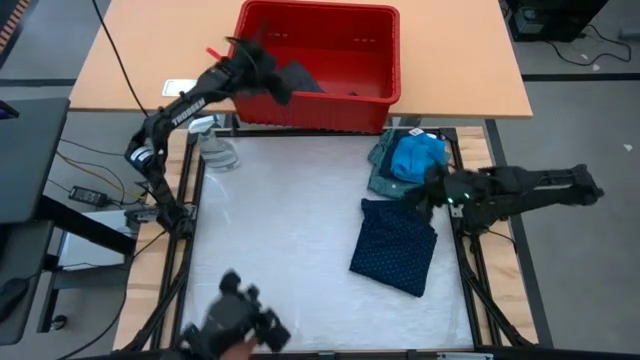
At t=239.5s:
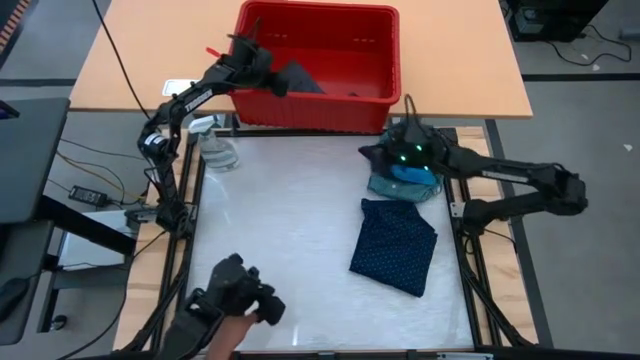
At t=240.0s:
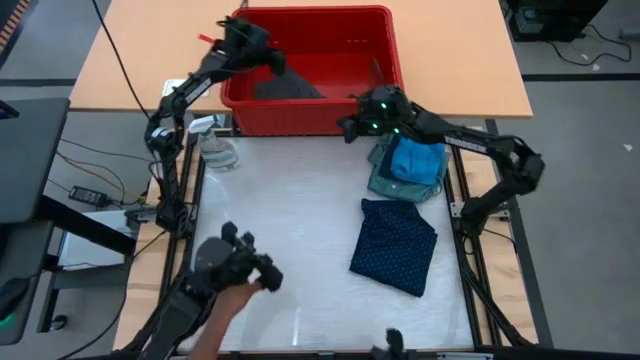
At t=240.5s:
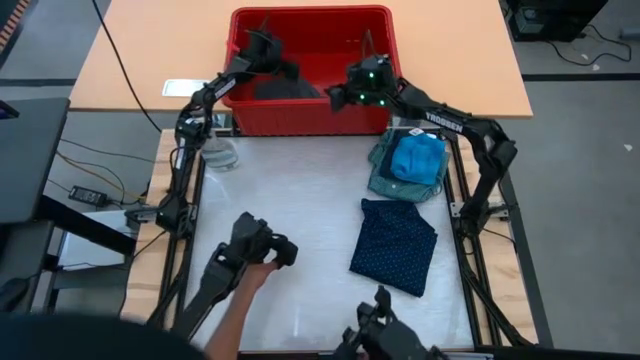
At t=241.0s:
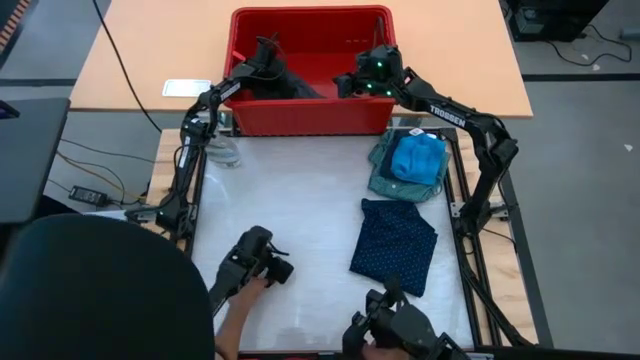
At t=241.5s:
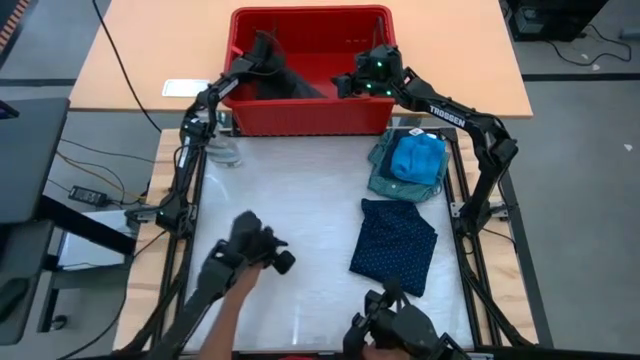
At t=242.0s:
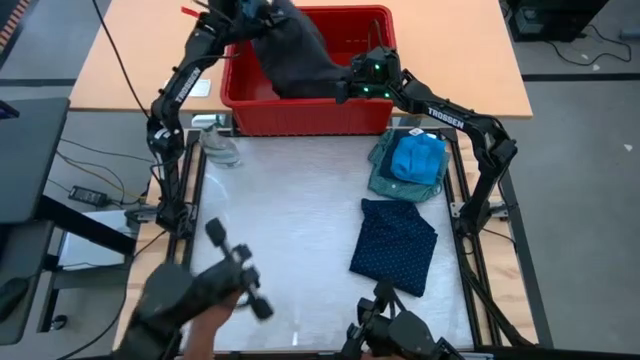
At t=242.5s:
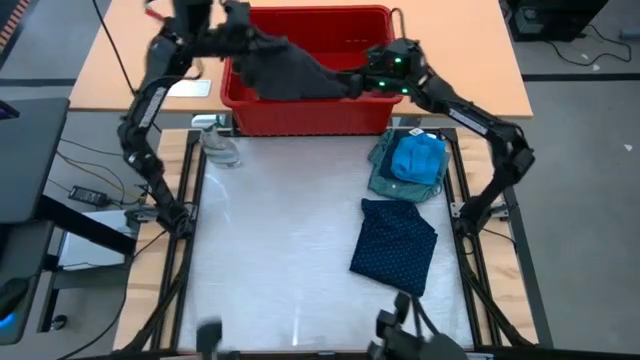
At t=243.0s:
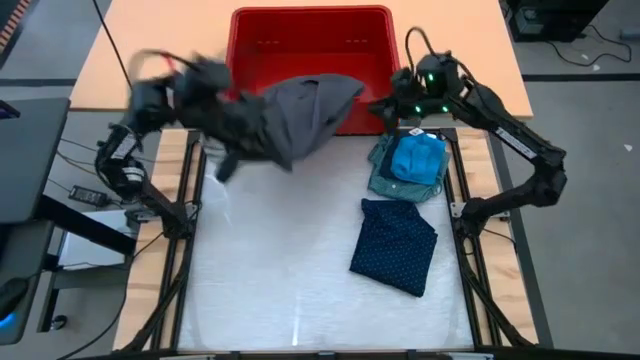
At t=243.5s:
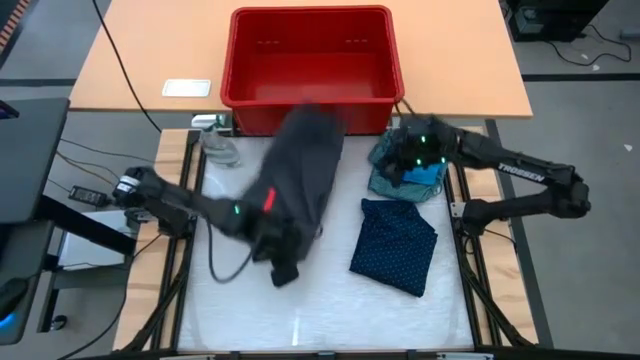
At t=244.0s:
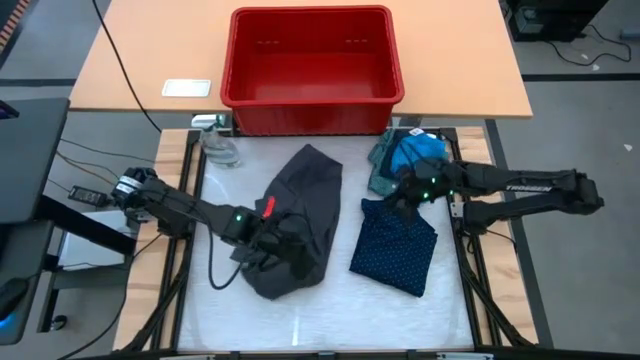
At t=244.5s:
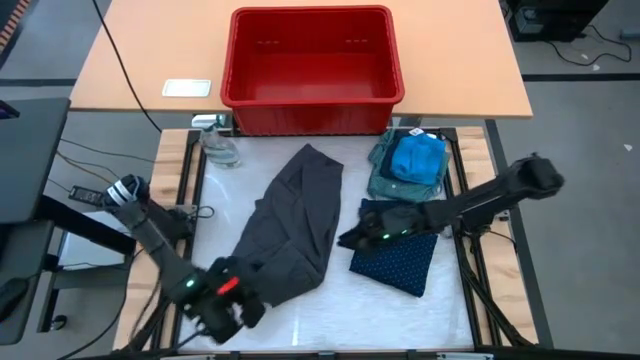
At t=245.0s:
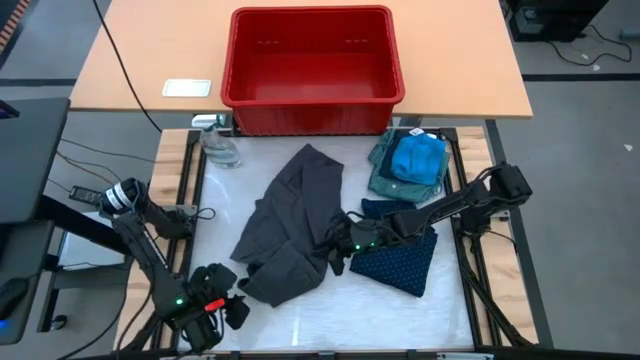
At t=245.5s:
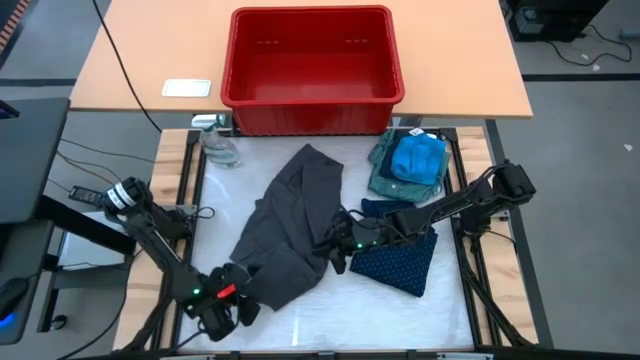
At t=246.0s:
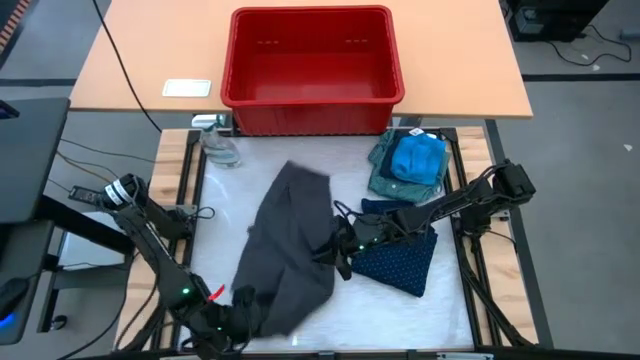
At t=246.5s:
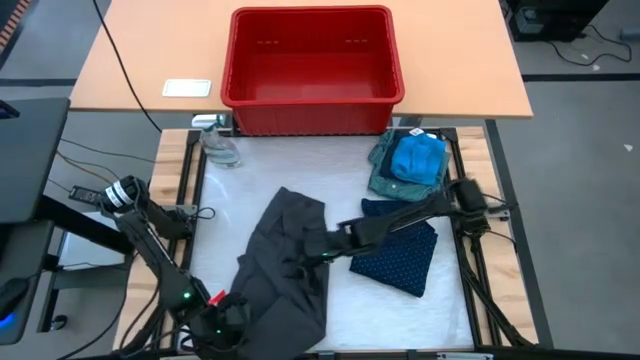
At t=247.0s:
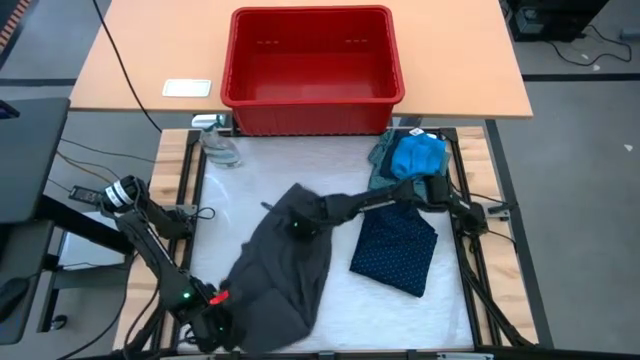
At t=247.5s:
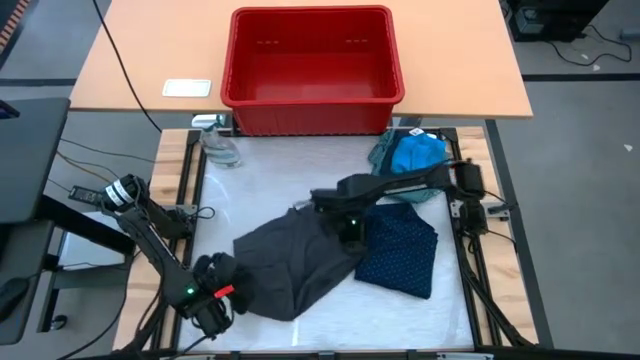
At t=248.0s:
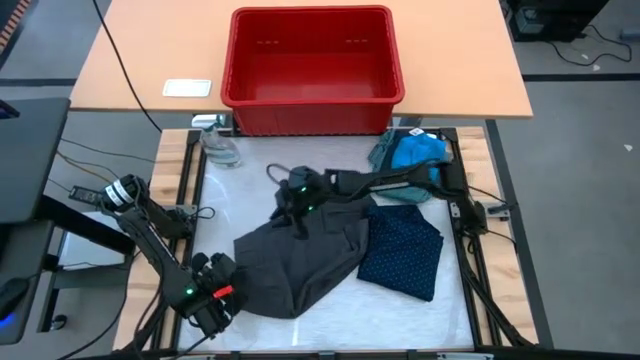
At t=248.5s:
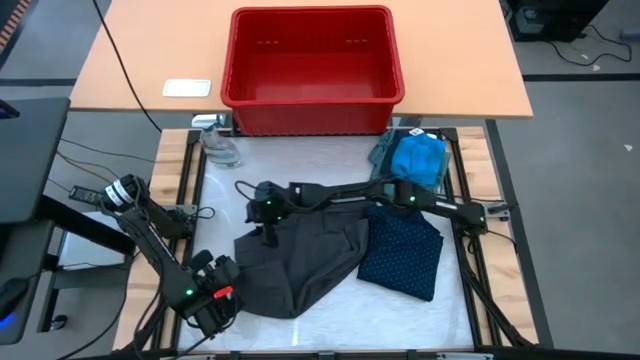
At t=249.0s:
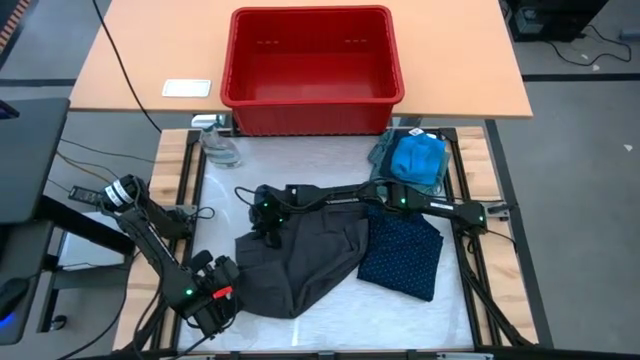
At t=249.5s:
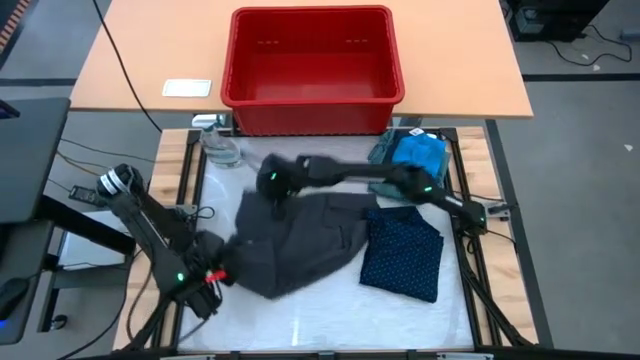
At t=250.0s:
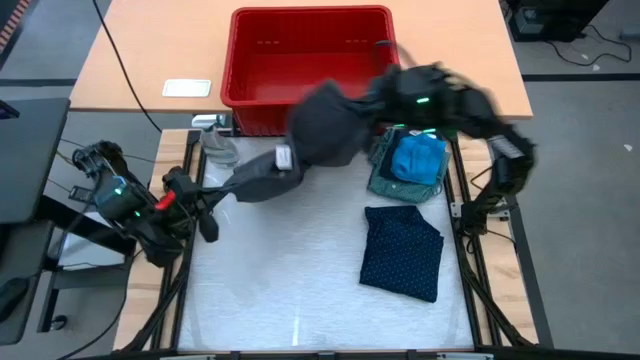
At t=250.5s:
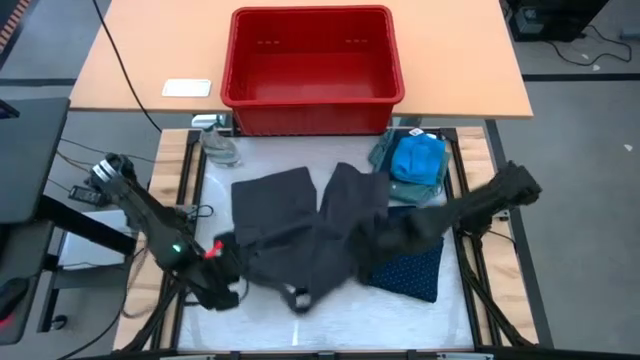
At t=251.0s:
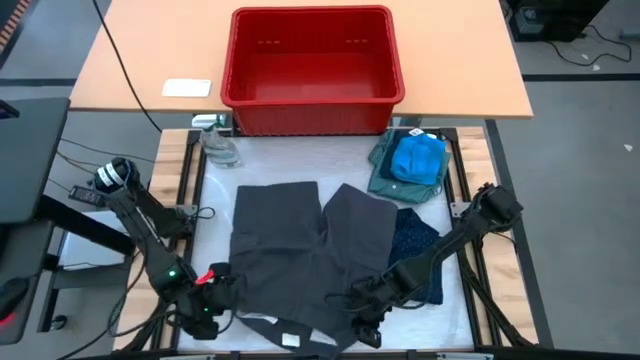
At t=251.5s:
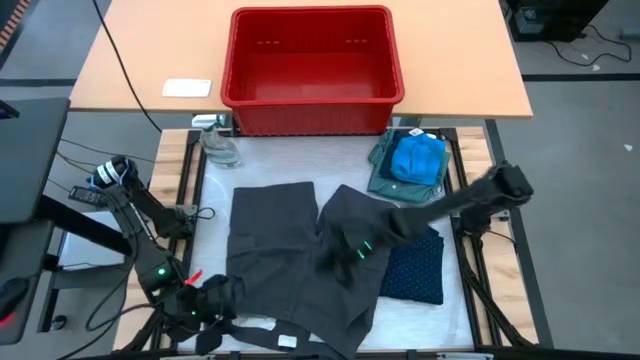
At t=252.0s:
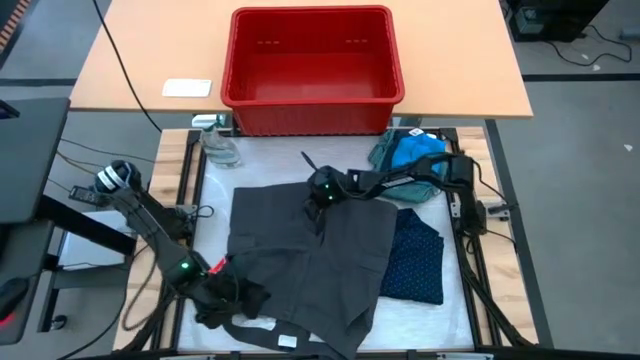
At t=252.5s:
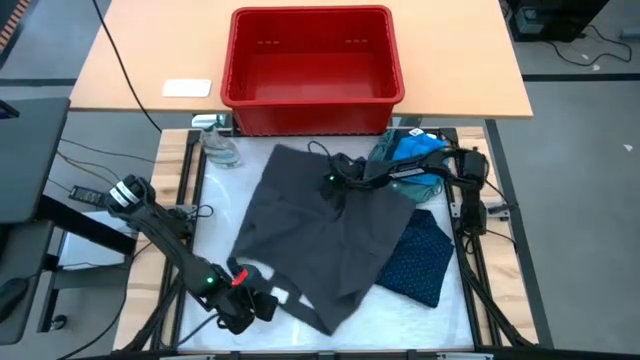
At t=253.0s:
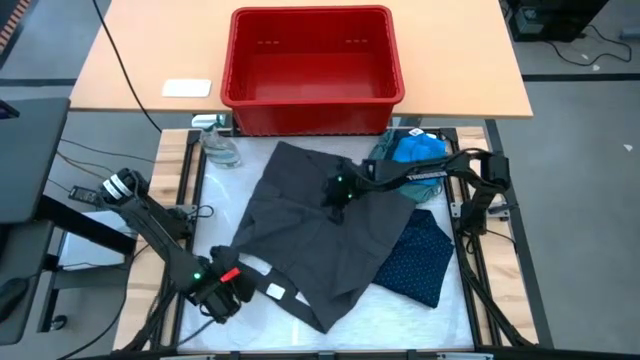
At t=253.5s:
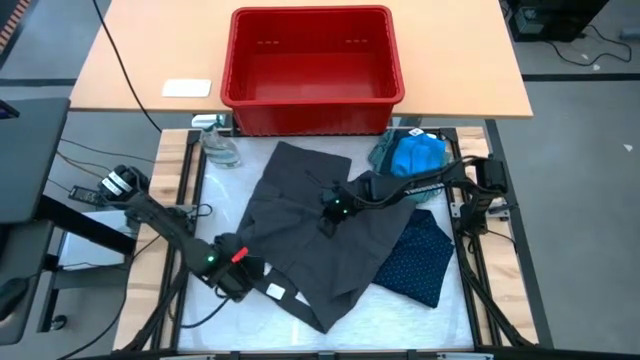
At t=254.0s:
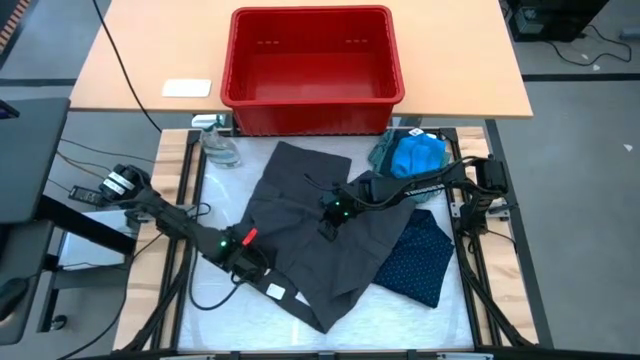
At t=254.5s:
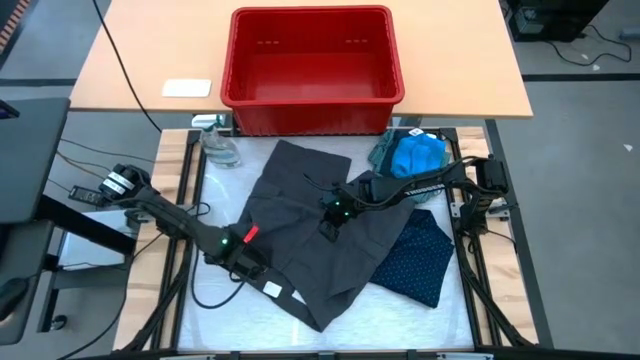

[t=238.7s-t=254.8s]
Task: Fold laundry
Fold the gray shorts

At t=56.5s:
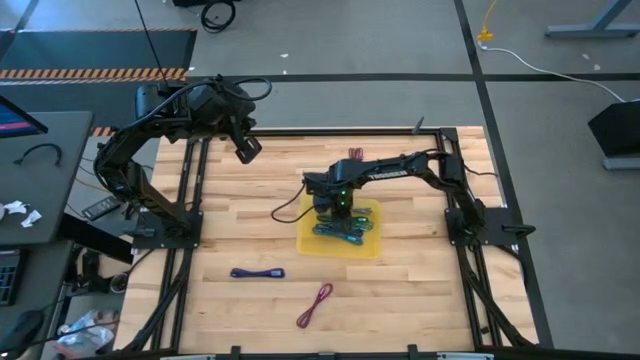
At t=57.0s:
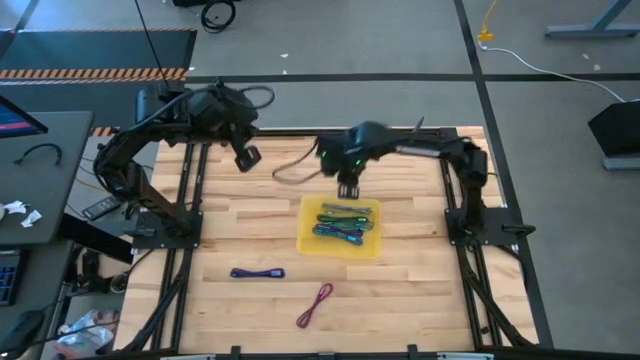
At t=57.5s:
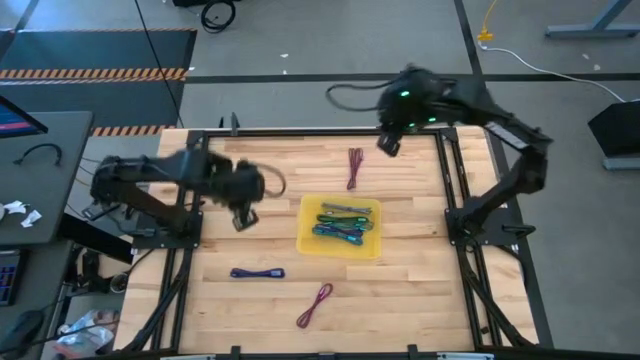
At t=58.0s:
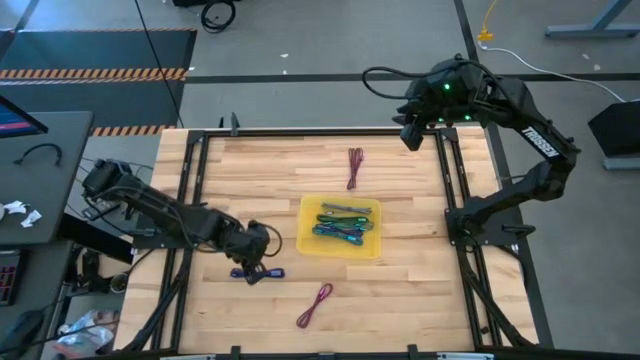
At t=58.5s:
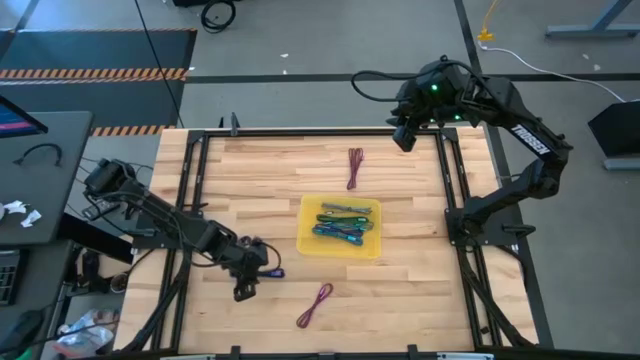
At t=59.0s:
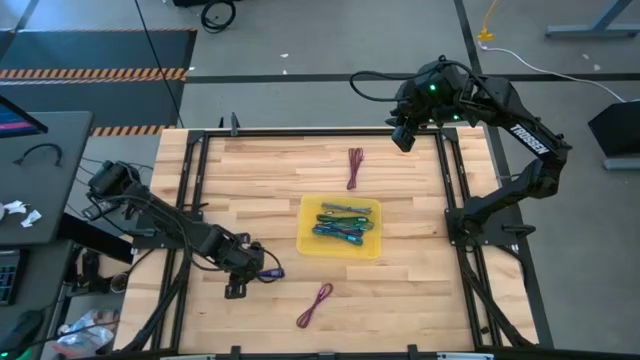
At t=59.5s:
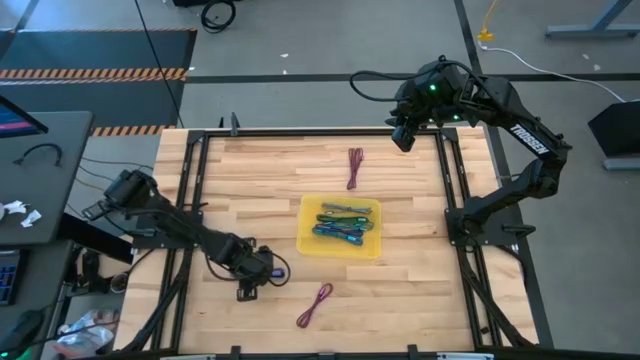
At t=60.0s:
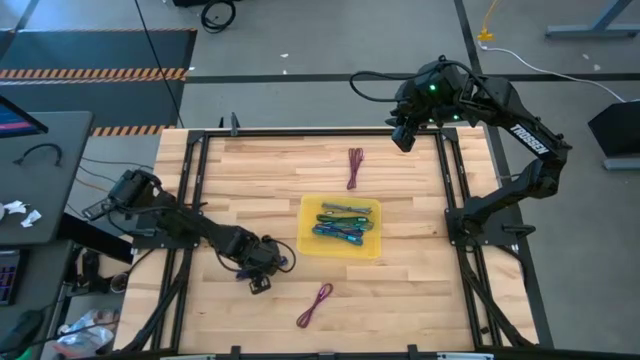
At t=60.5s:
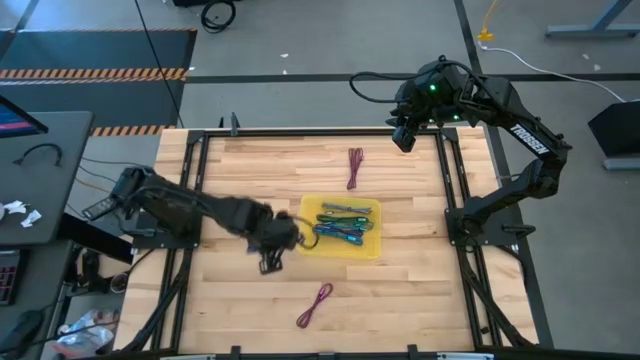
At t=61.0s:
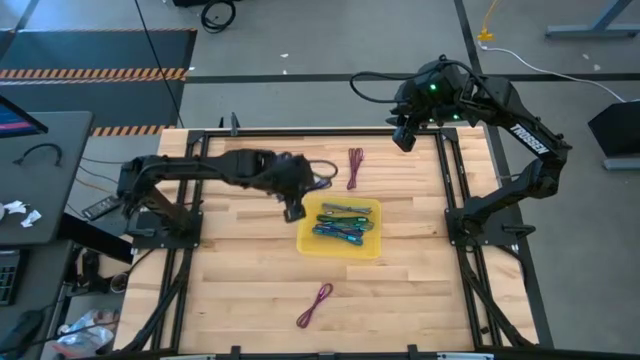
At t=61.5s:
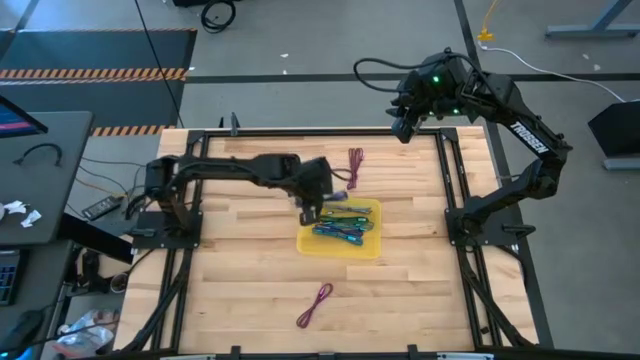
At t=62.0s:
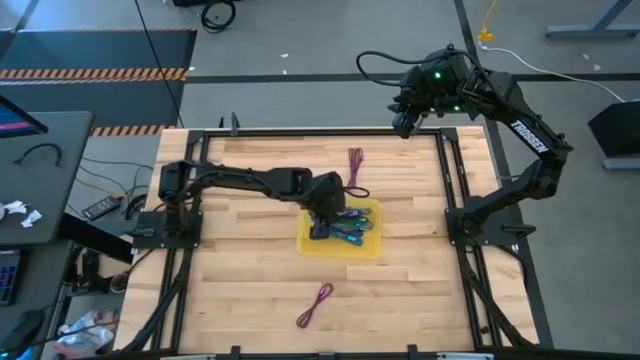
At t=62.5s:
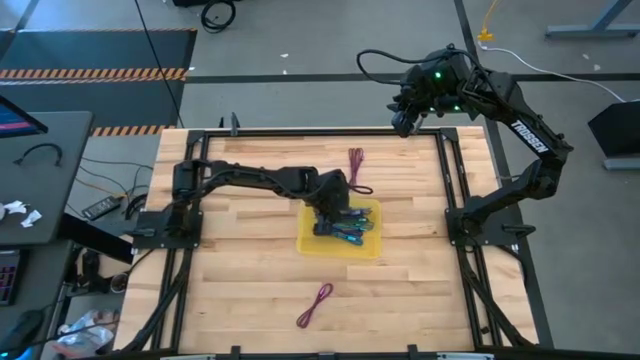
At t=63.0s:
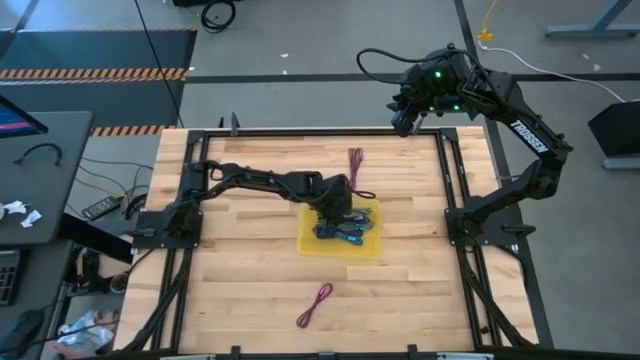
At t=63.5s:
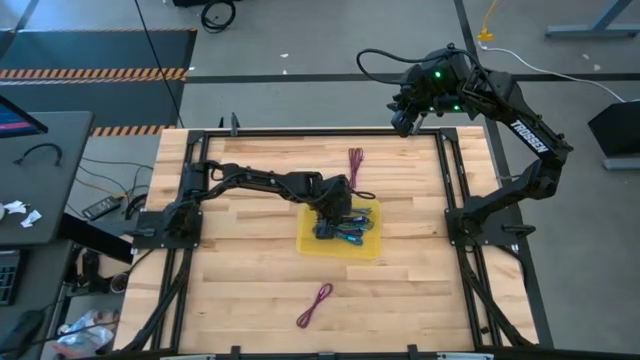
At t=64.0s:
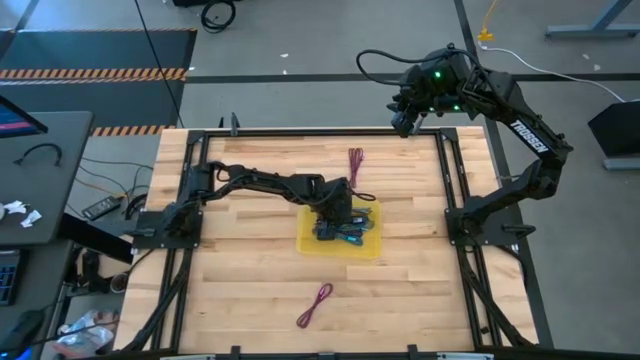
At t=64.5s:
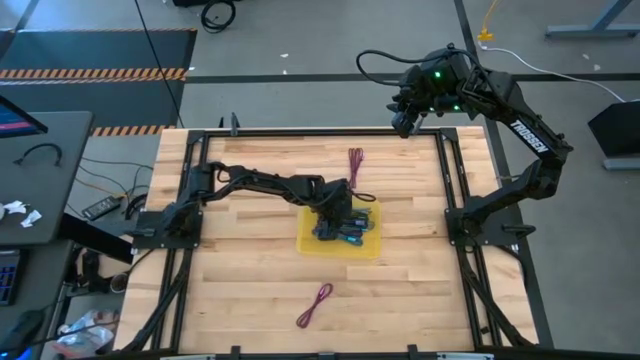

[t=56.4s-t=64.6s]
Task: Pick and place USB-C Cables
Put the purple charger cable into the yellow bin
